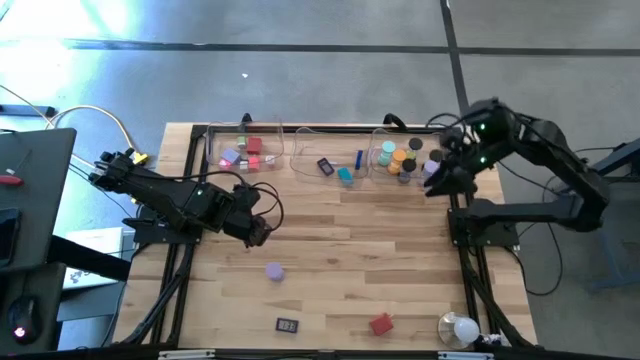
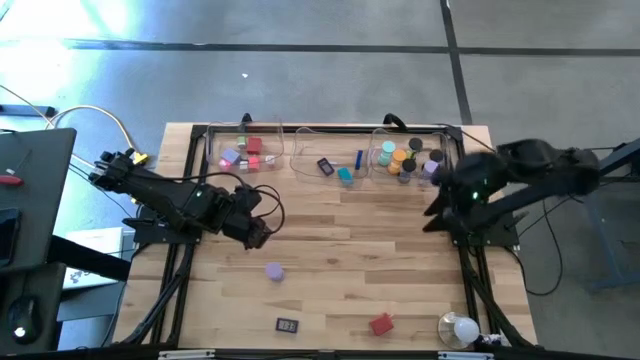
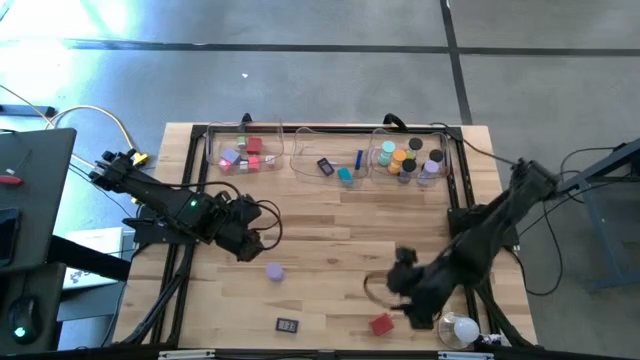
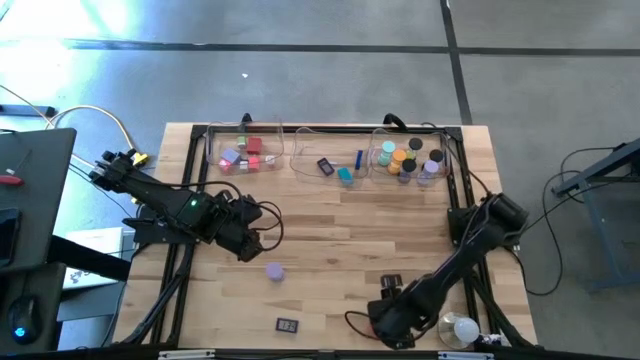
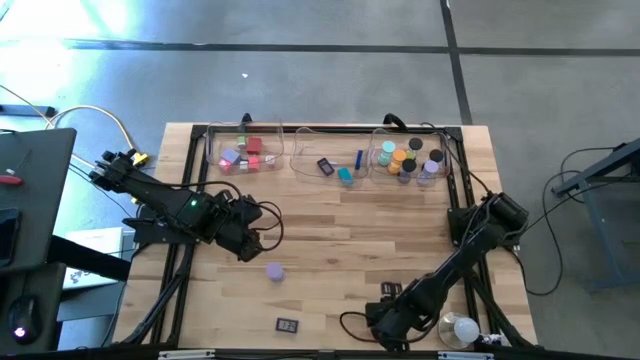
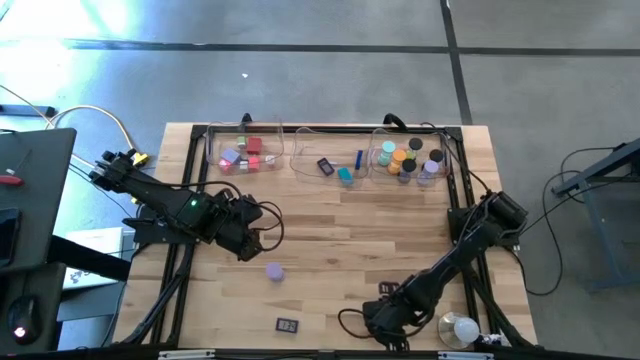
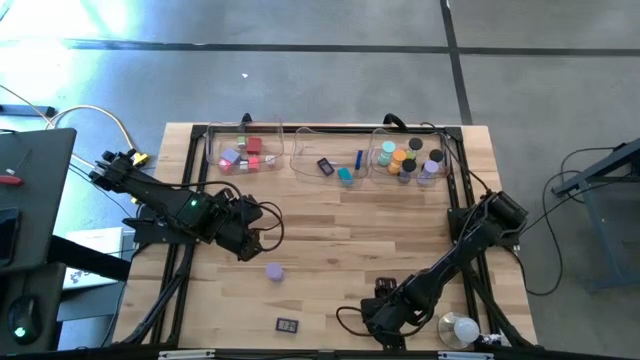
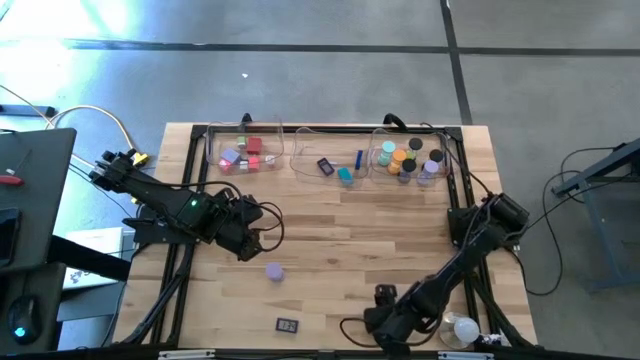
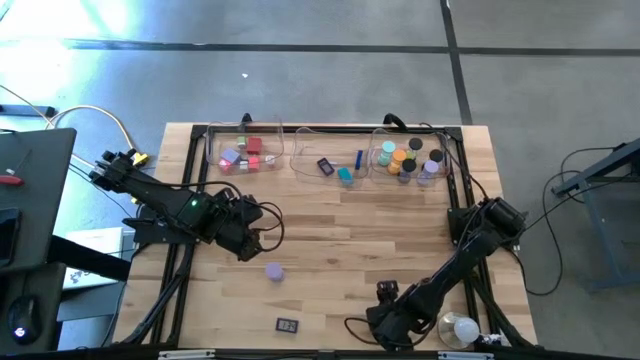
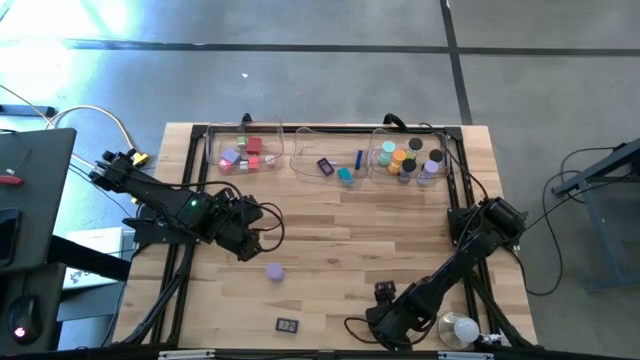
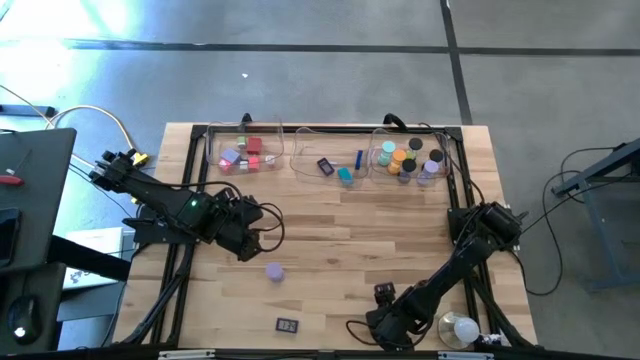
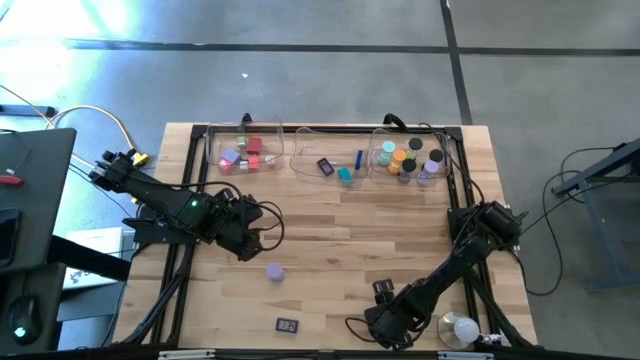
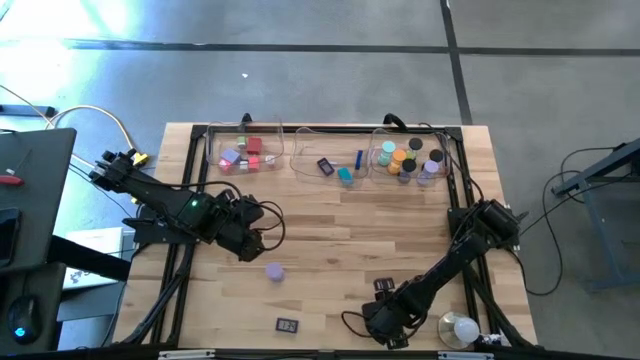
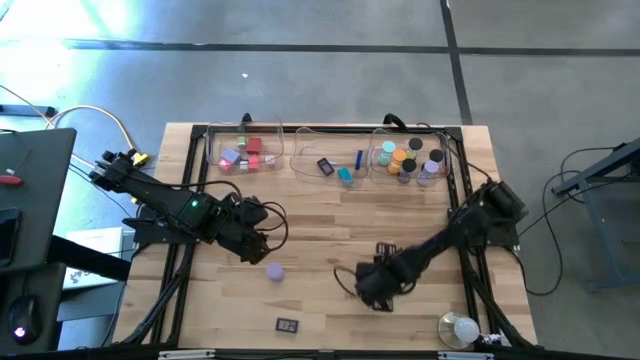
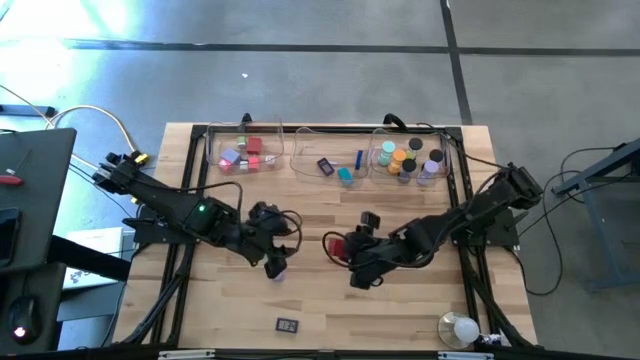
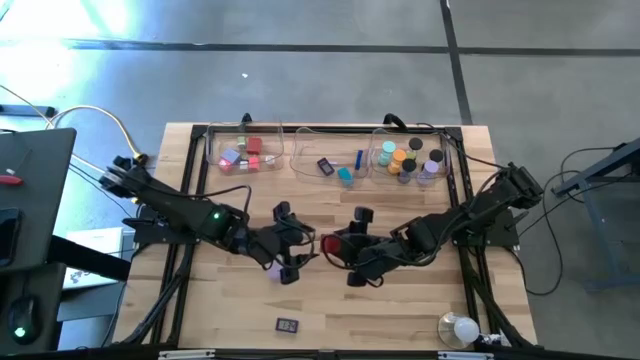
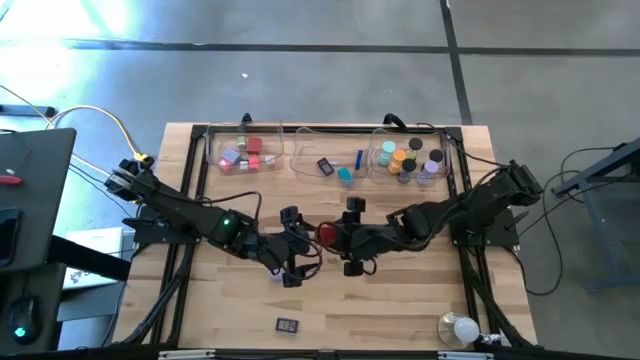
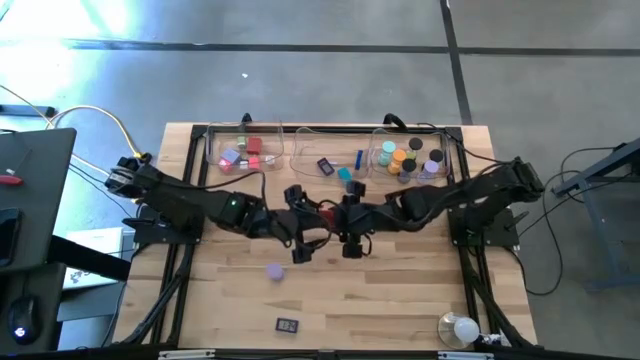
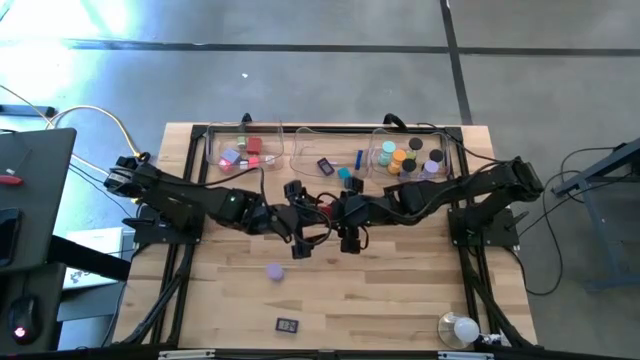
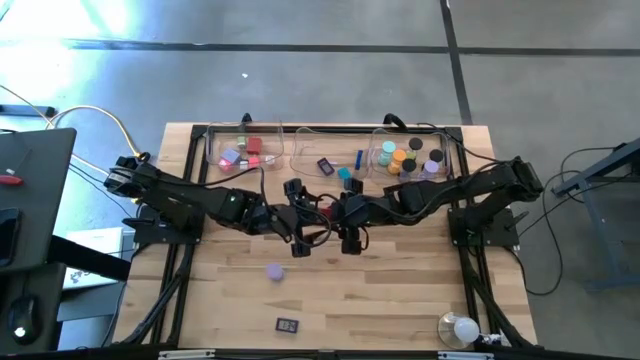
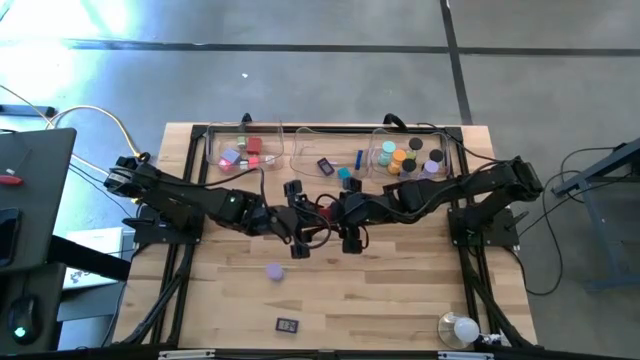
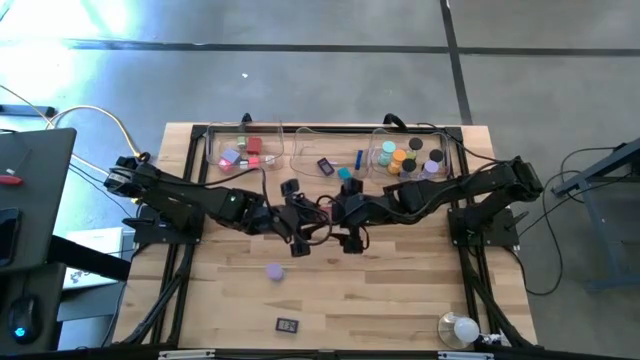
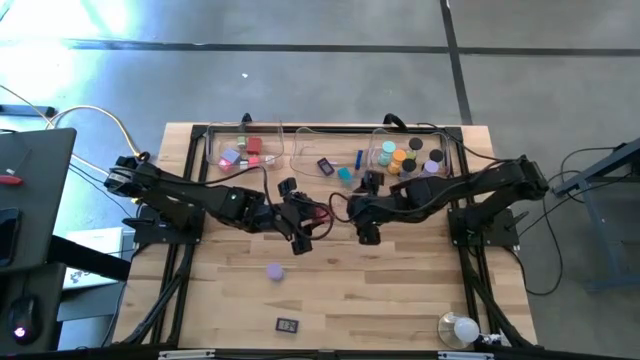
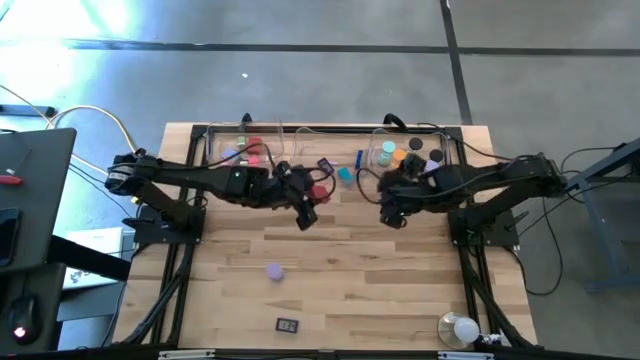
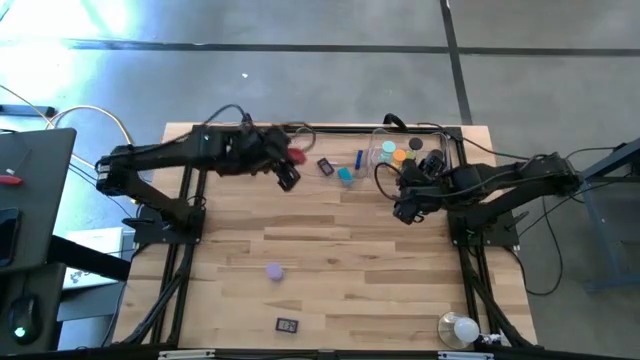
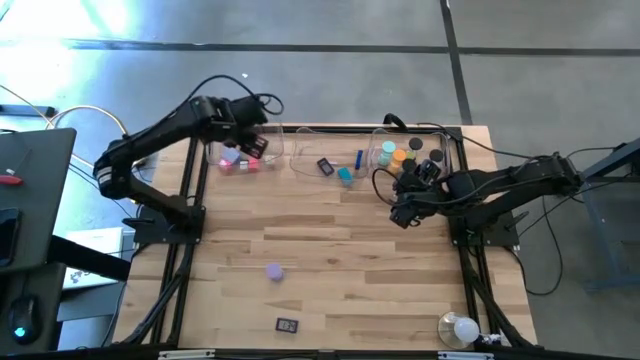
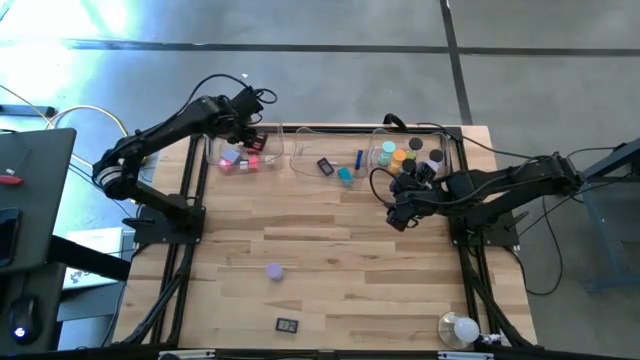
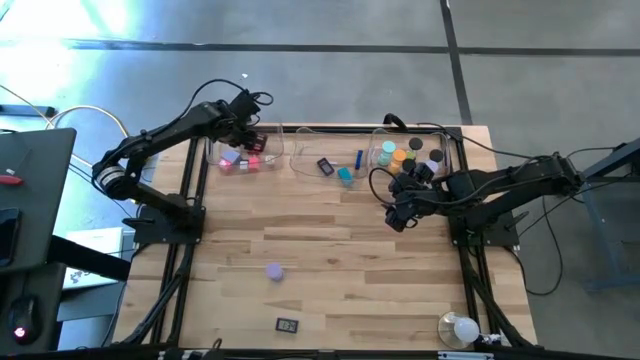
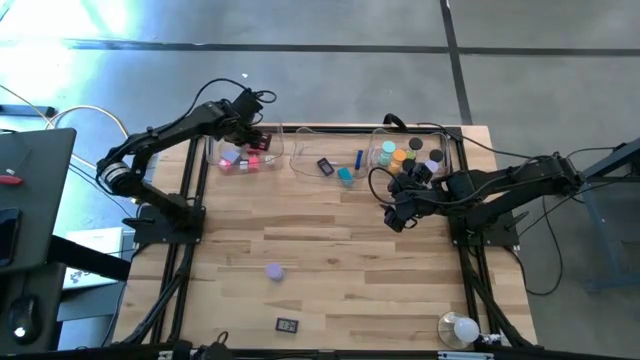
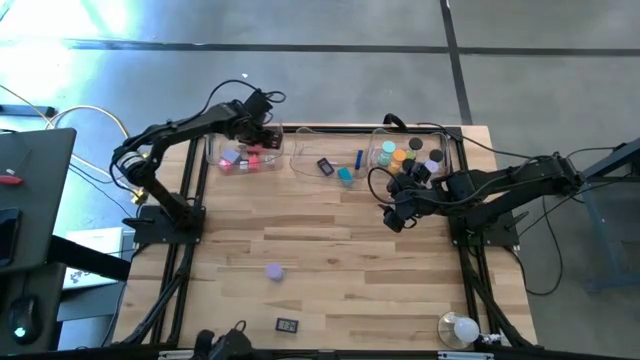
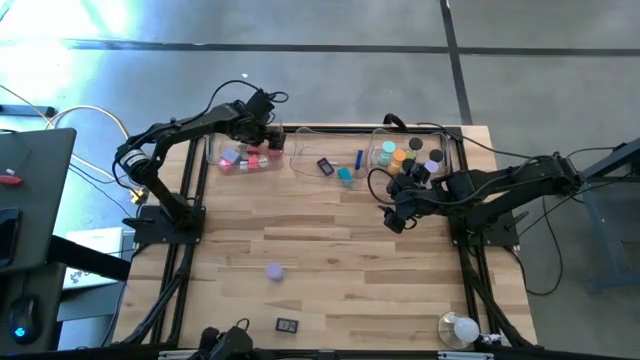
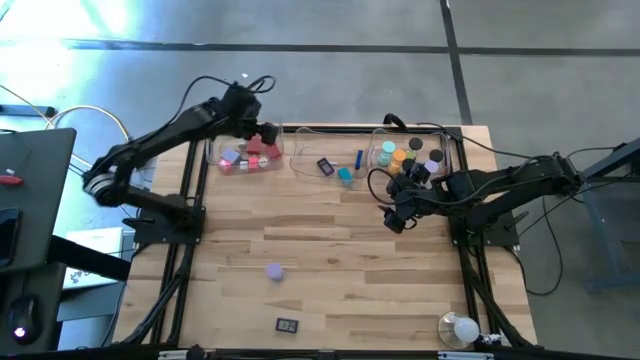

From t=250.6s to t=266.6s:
Task: Pick & Place Office items
Put the red charger adapter into the left transparent bin

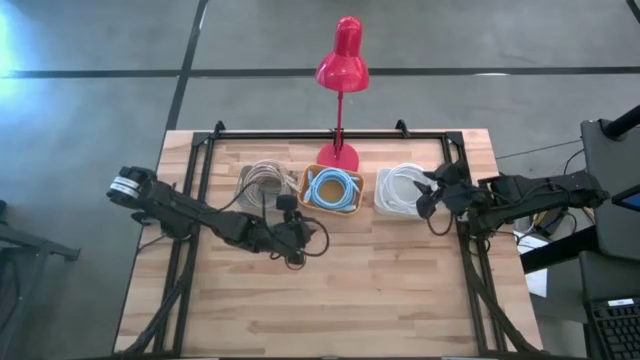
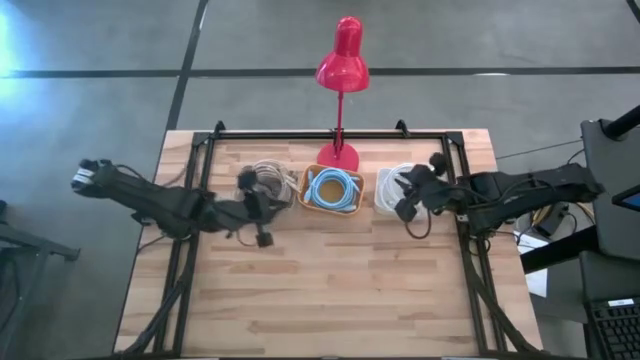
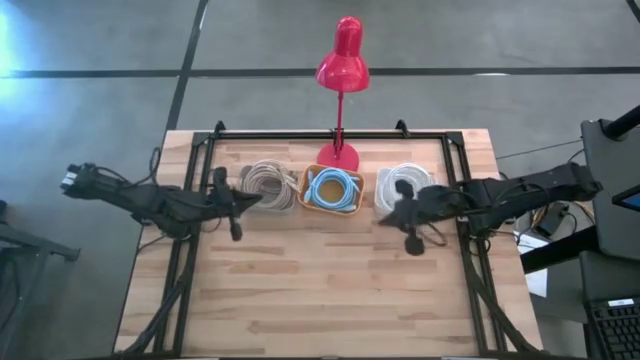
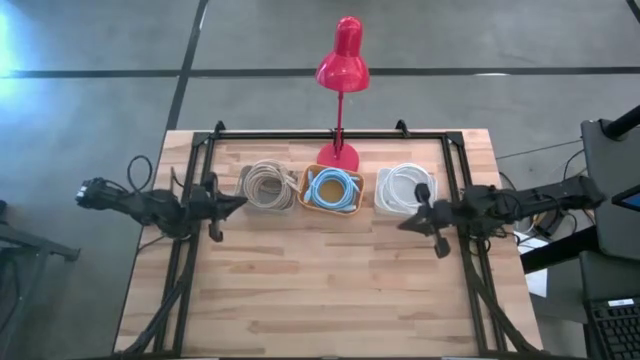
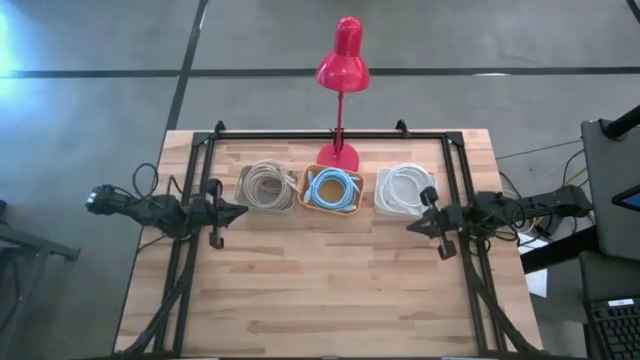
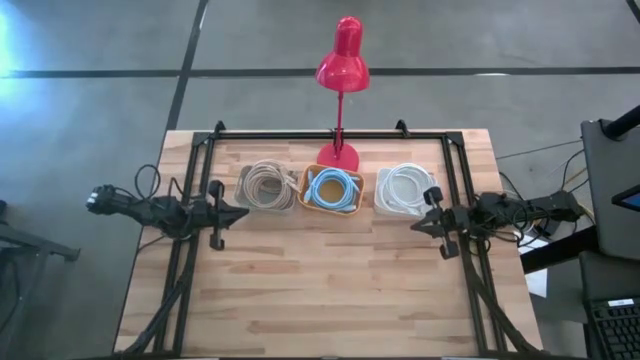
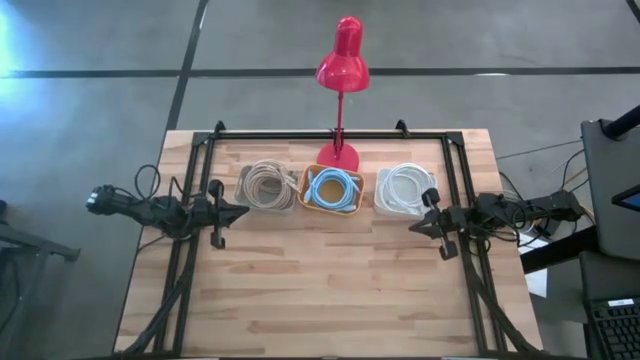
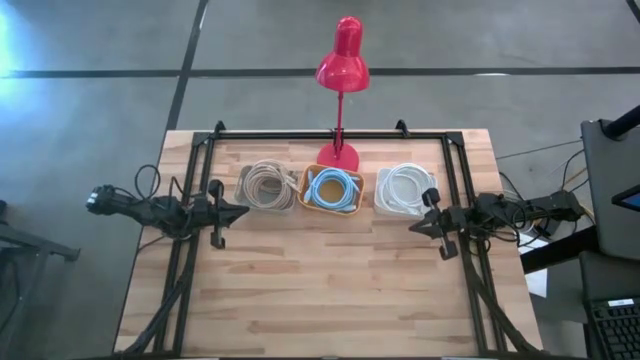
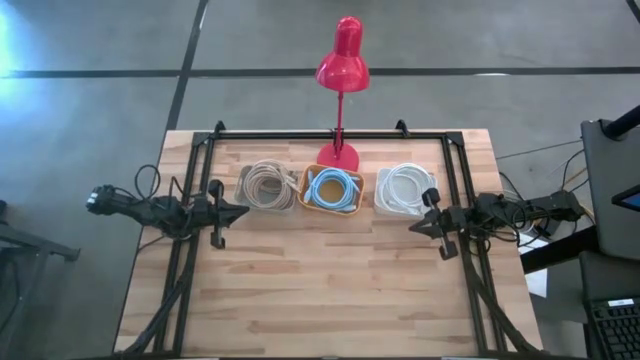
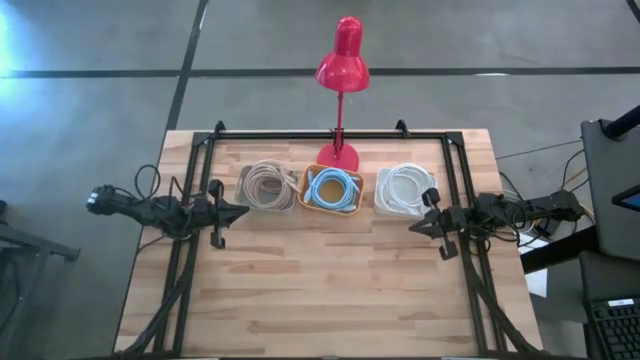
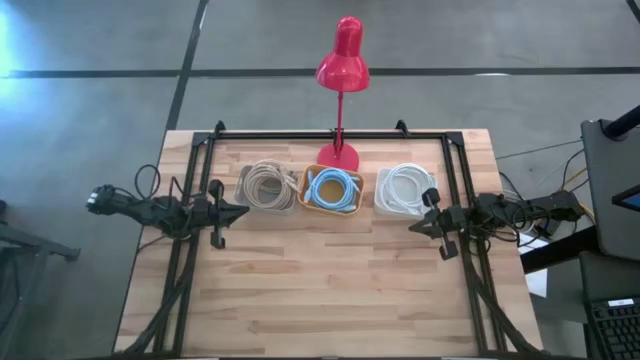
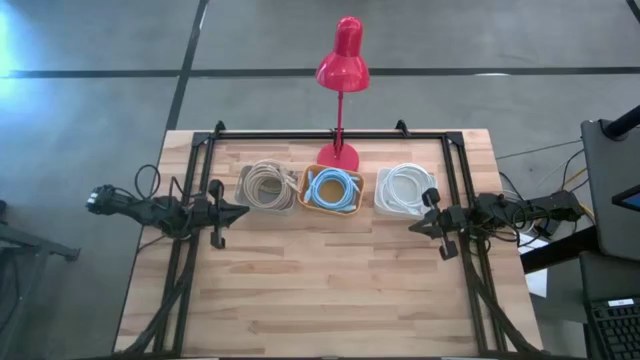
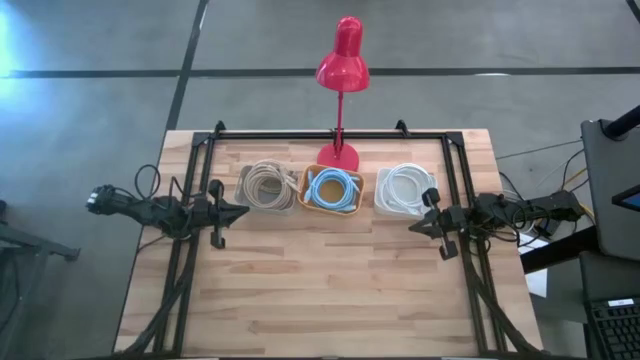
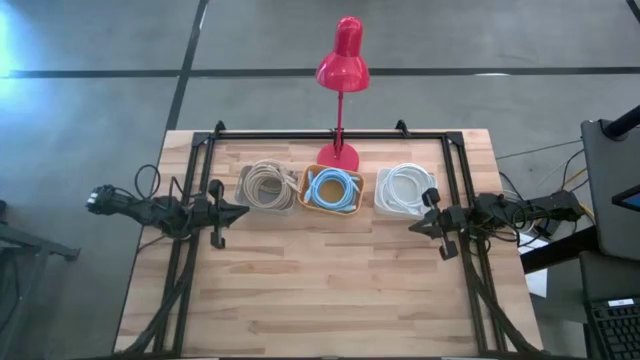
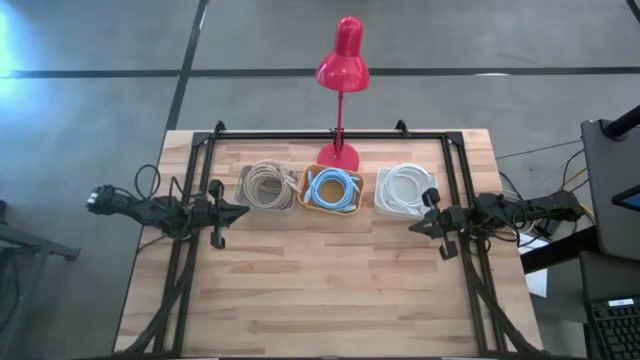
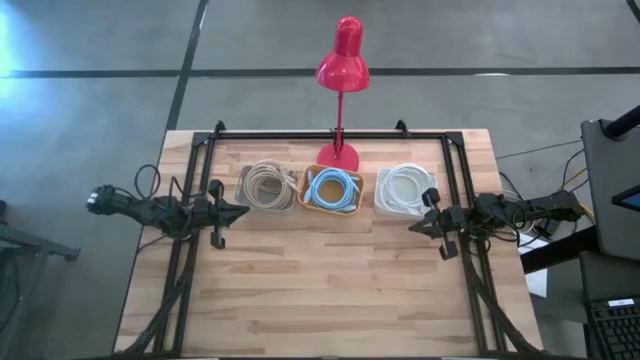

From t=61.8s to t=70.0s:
Task: Sort HDMI cables
Return to Home Position
